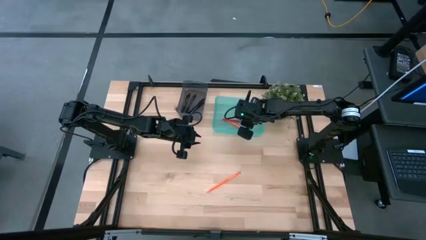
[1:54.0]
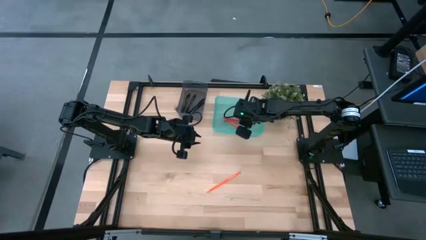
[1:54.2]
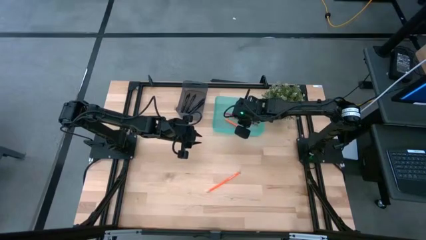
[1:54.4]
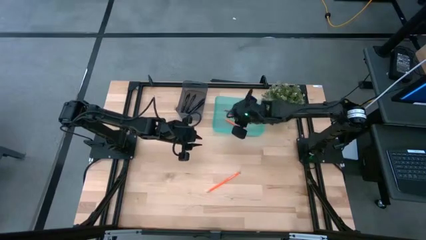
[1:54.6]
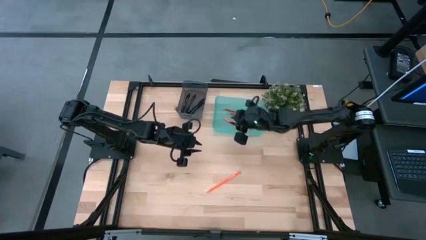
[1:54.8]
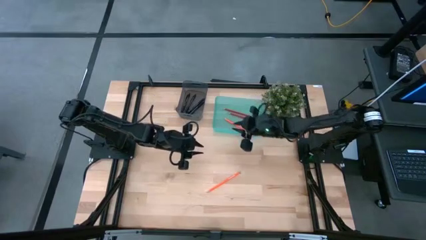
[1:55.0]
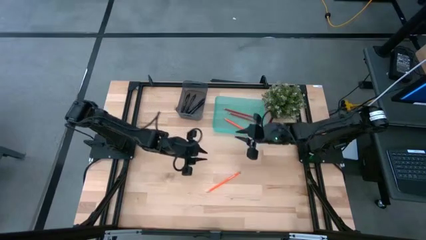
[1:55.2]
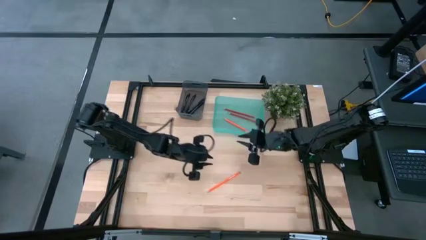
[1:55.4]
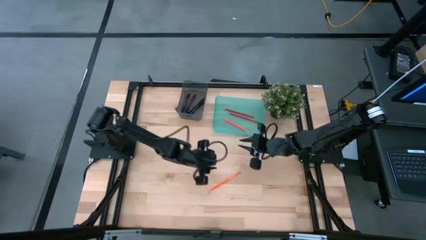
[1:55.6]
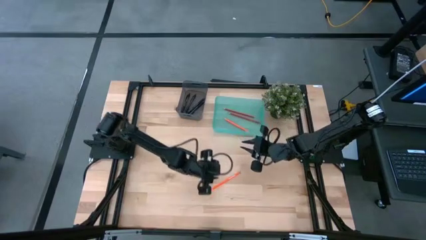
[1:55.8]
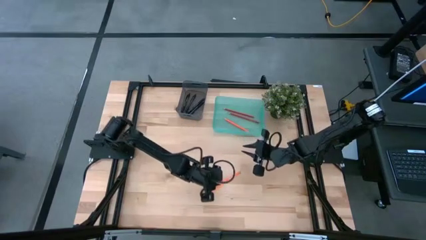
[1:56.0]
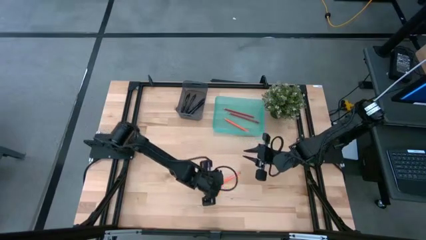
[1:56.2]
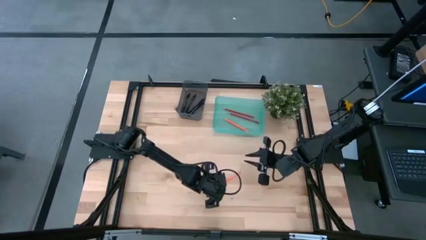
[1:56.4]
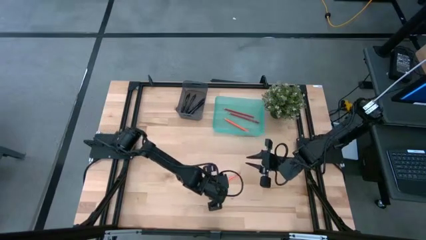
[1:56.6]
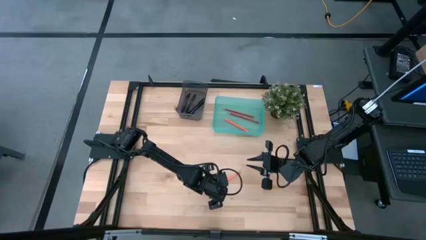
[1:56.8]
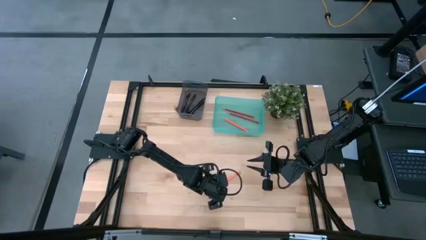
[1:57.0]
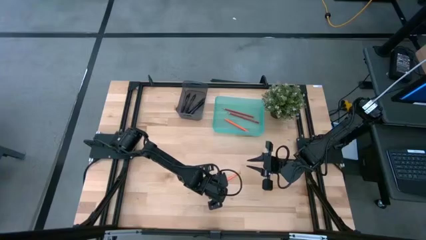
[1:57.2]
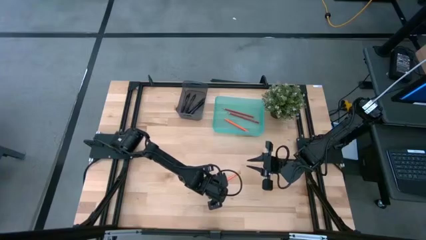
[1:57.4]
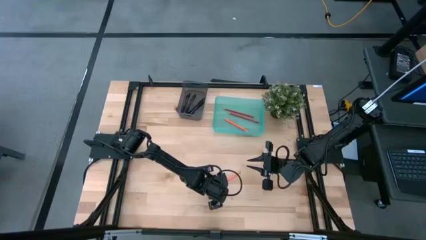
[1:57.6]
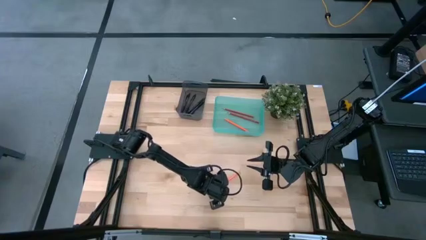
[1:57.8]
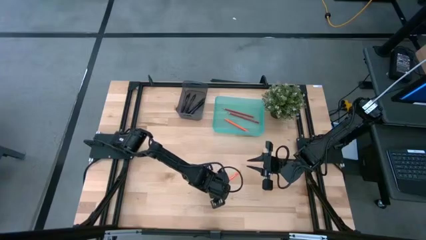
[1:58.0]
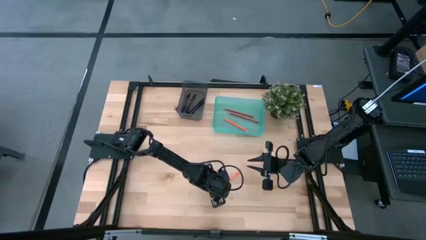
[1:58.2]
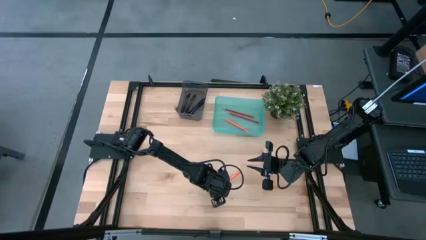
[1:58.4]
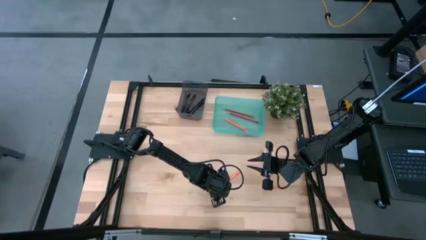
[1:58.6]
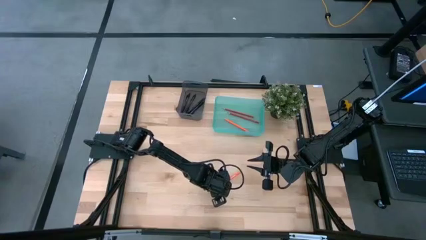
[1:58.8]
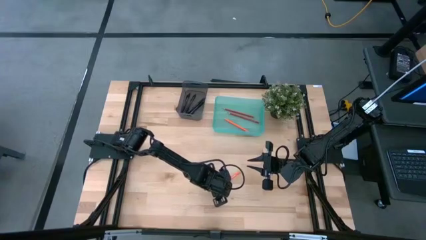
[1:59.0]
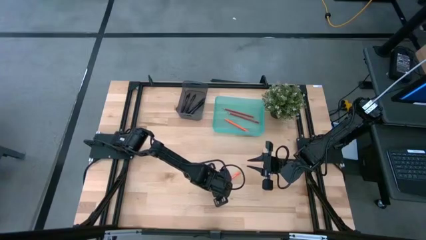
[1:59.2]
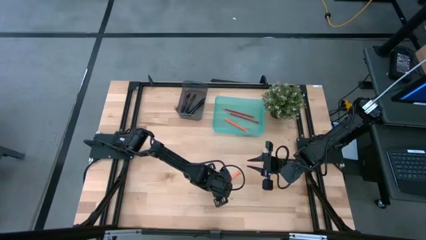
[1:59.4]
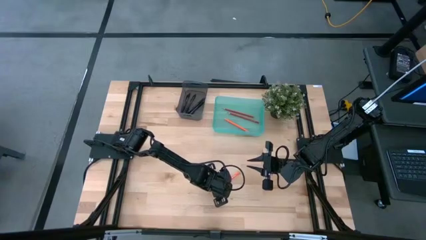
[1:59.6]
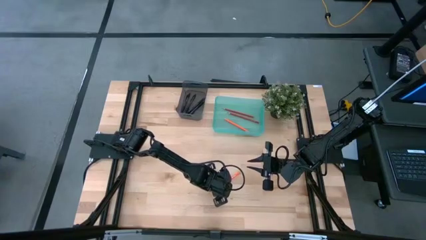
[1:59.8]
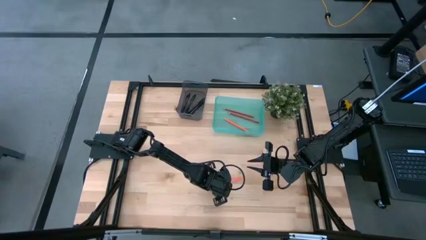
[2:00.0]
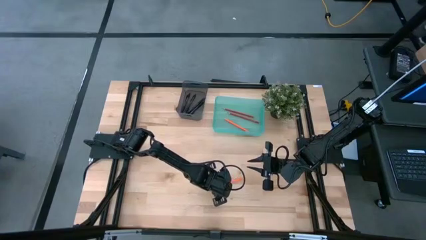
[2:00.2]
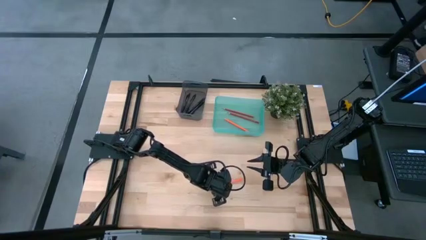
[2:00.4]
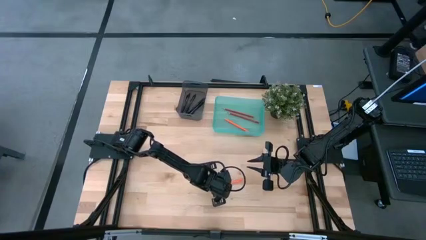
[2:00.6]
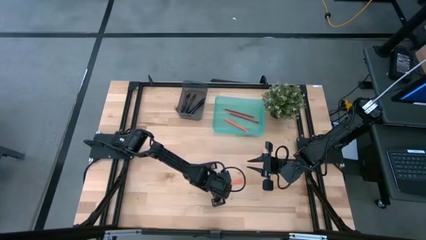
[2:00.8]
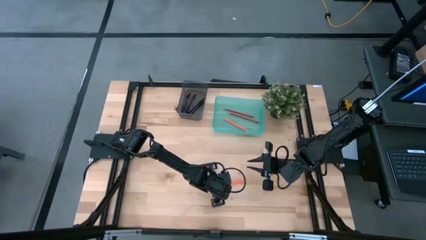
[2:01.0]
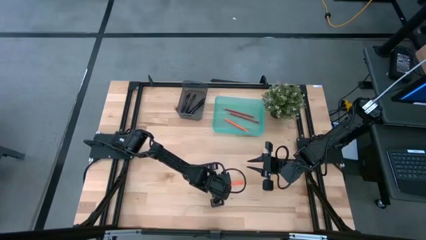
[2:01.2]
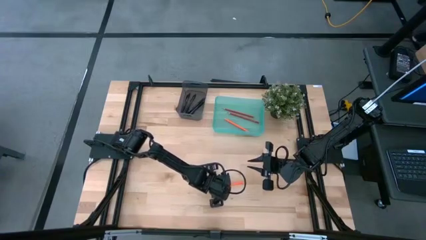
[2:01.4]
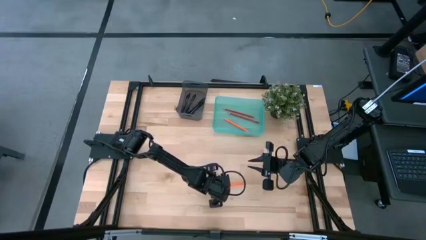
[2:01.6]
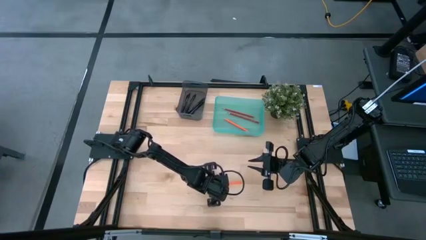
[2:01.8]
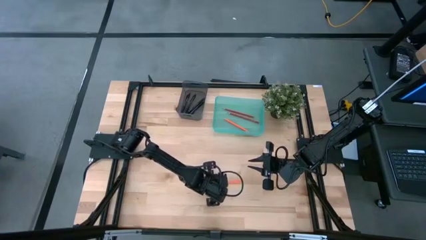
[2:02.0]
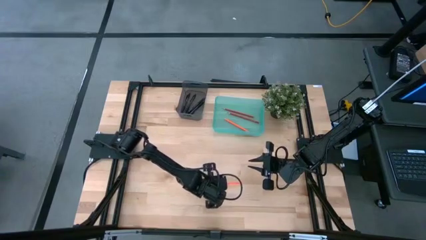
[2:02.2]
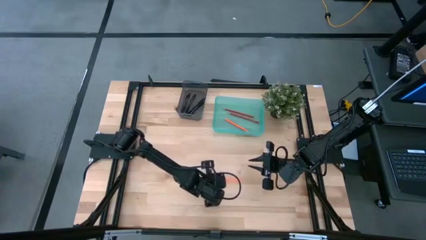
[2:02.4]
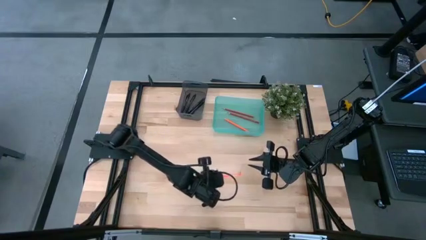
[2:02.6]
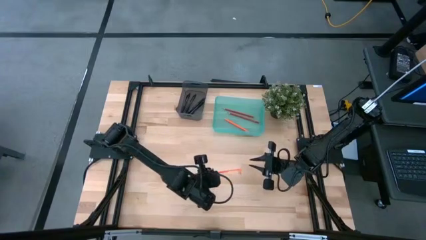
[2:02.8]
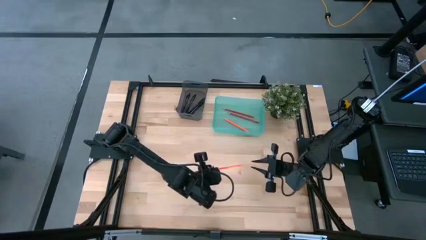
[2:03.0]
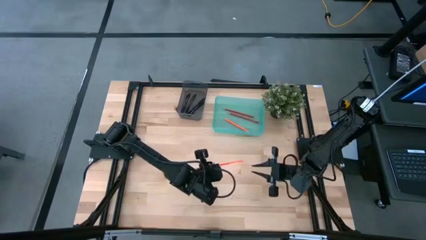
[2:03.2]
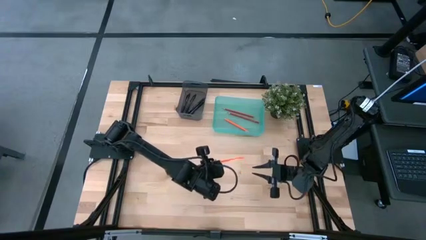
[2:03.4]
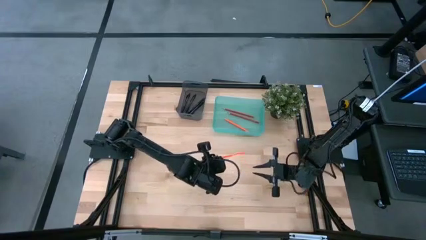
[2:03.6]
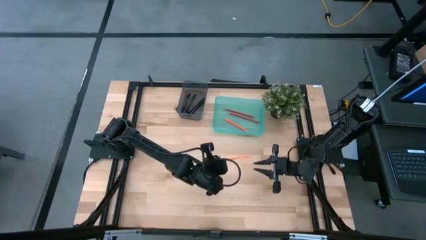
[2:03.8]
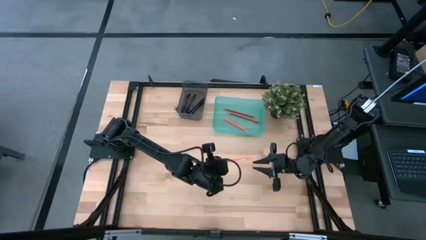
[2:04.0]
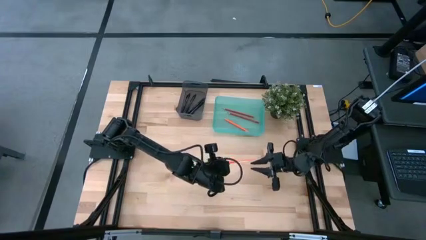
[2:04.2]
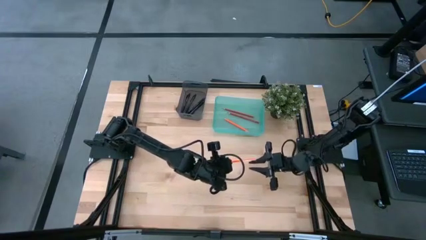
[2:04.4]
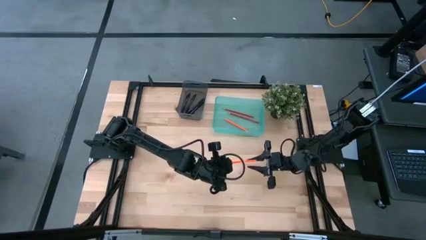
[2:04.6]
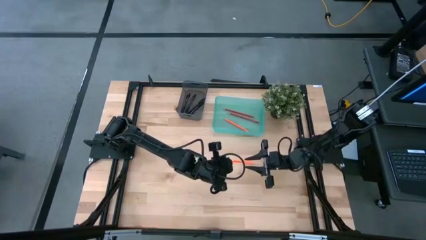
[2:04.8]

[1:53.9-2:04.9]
Task: Sort pens & pencils
Put the orange pencil into the green bin

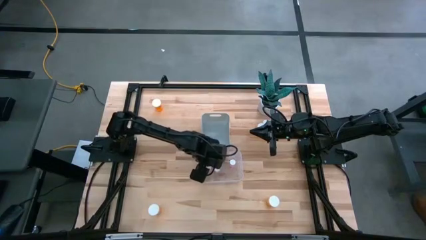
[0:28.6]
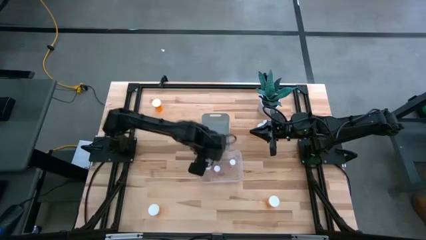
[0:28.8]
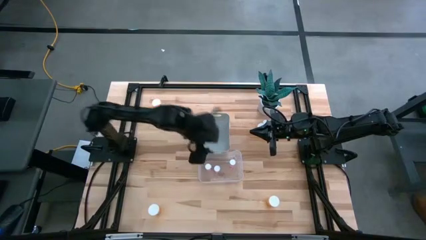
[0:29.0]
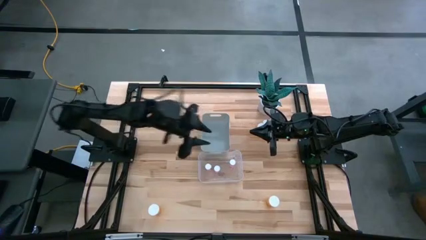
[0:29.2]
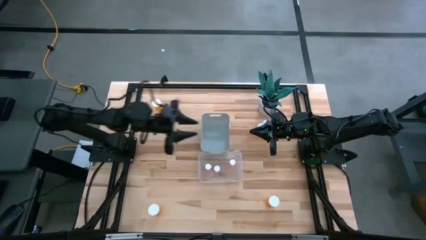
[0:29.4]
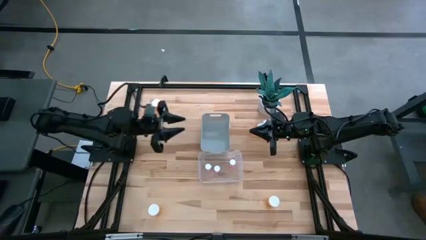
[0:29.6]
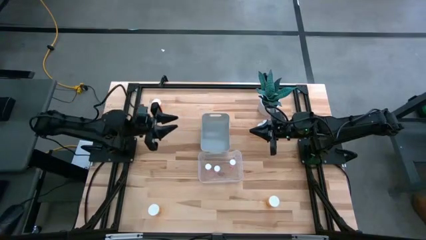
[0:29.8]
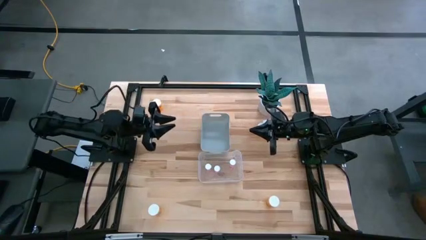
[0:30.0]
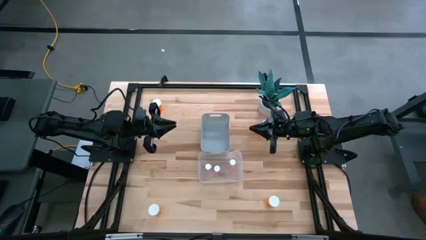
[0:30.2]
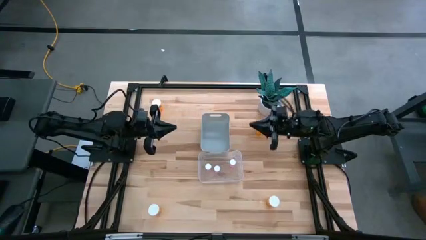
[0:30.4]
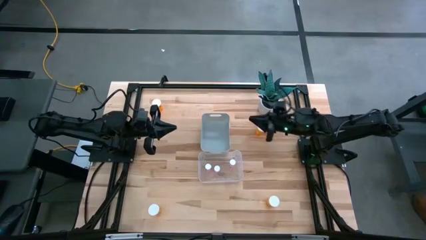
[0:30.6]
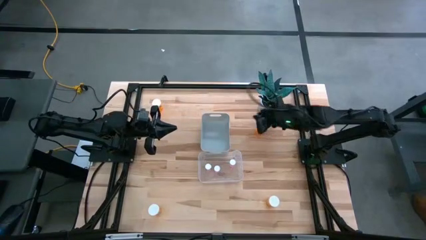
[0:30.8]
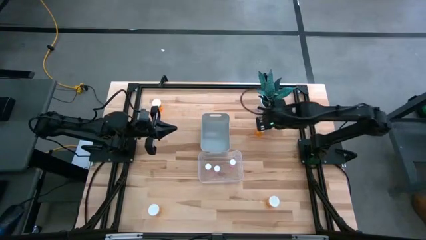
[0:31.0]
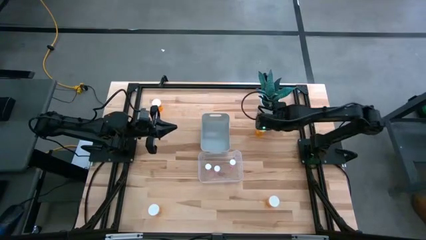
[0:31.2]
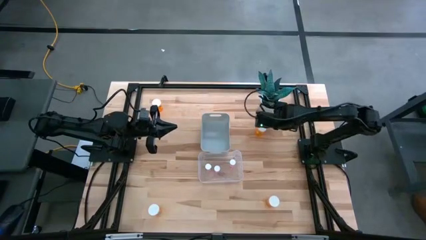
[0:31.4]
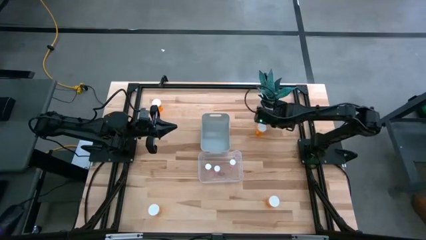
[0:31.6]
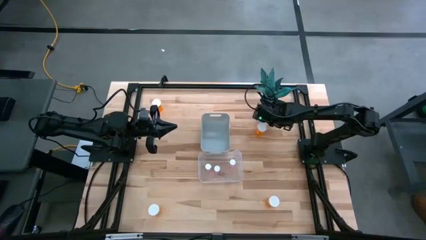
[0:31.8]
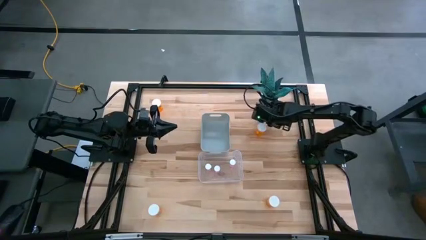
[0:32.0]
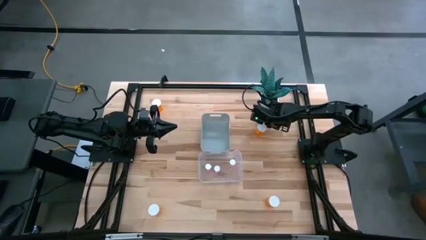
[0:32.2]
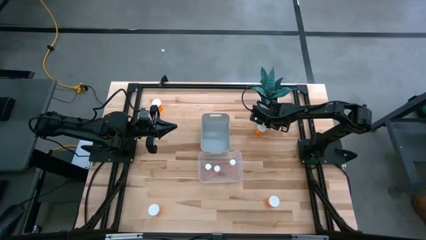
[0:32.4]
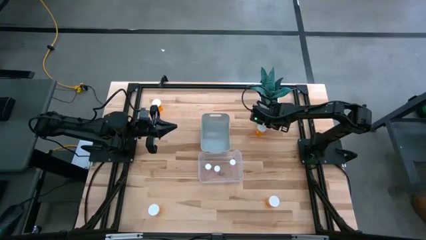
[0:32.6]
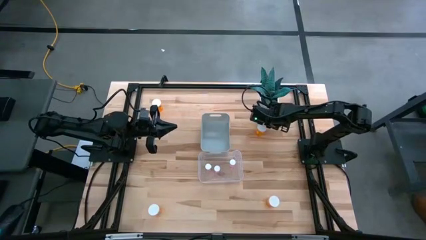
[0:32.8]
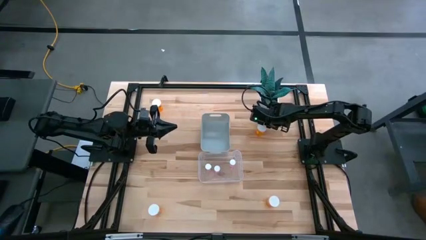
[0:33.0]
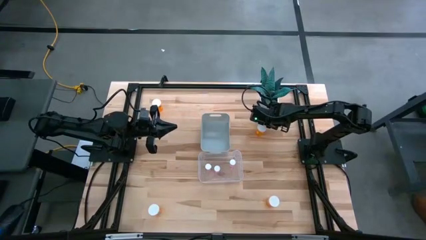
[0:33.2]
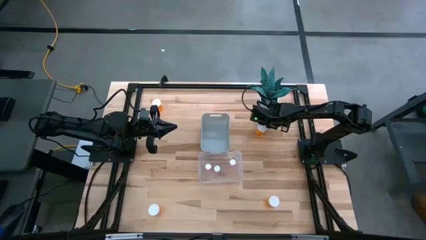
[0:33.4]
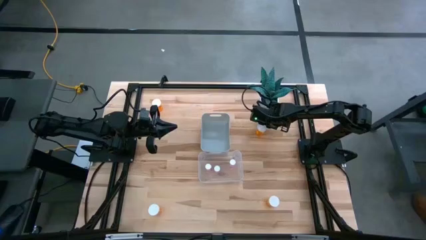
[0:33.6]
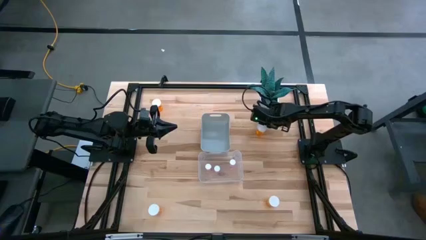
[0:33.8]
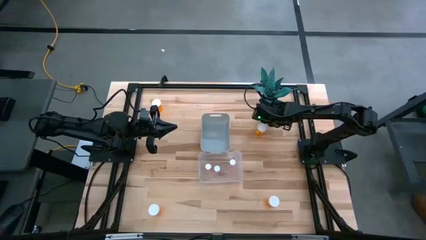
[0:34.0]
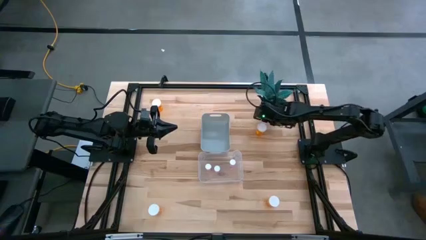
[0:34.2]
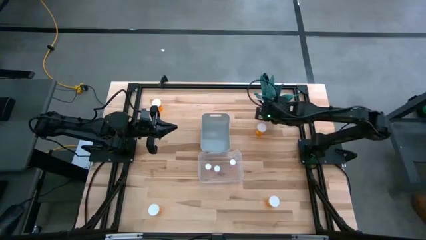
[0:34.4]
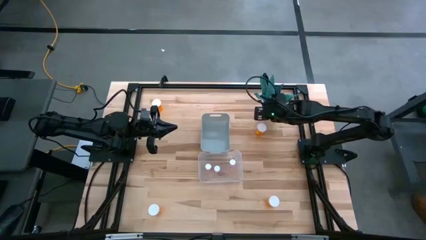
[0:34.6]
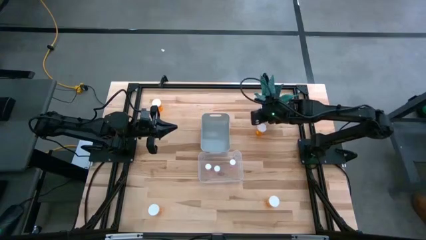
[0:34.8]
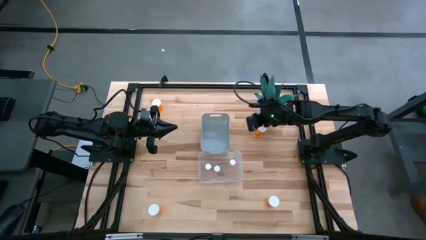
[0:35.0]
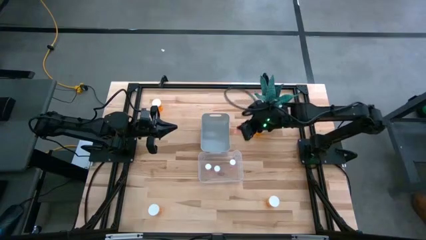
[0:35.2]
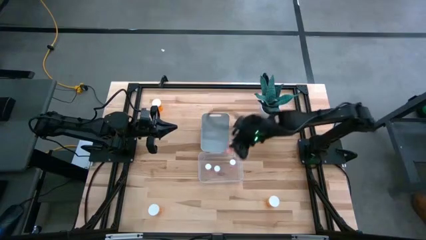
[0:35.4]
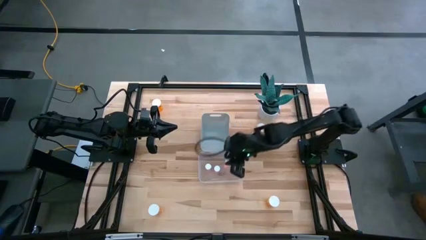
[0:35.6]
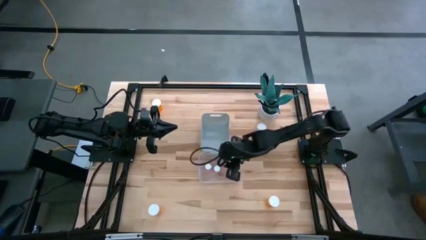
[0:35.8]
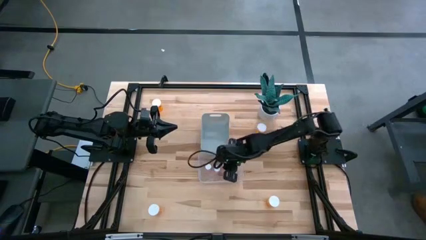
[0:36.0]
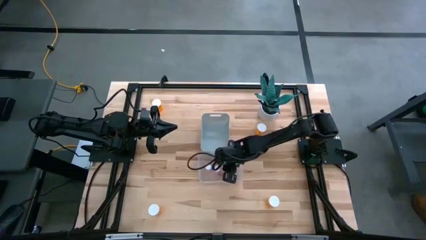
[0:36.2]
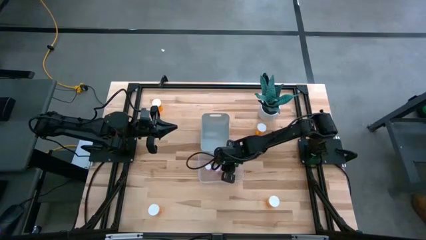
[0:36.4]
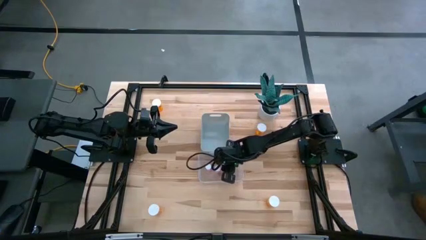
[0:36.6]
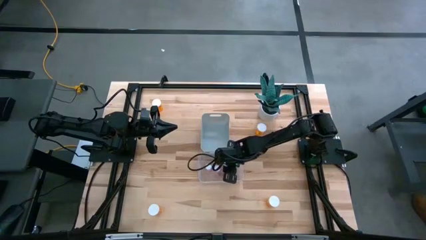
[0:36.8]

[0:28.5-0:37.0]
Task: Pick and place medicine bottles into bin by pill shape (circle, oval)
Put the pink pill bottle into the transparent bin
